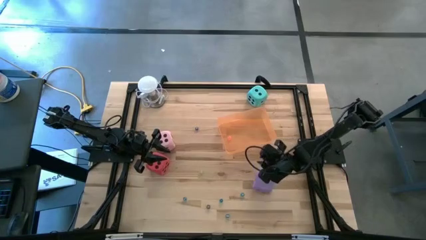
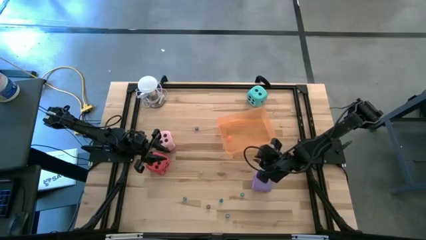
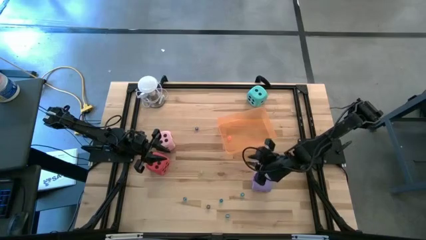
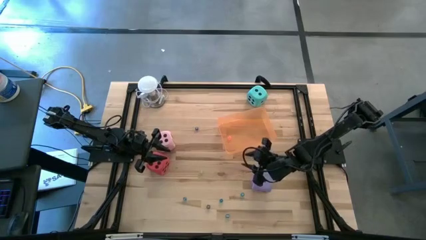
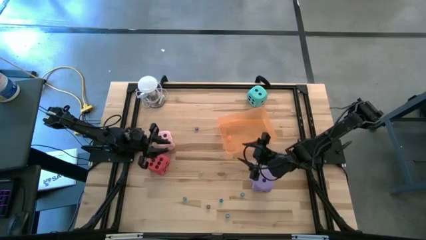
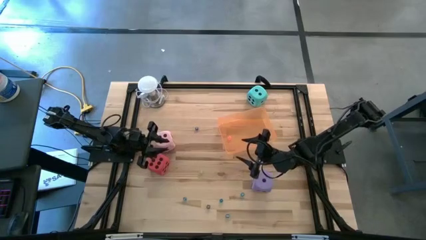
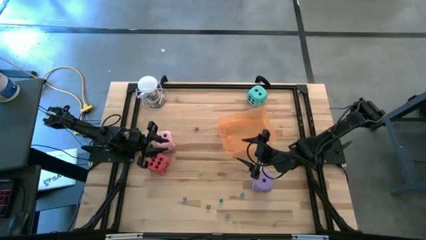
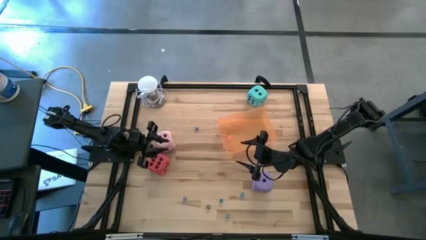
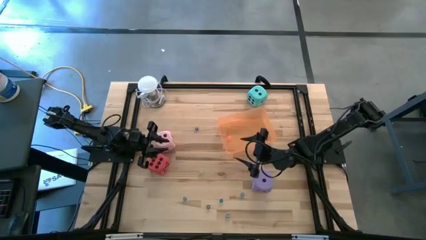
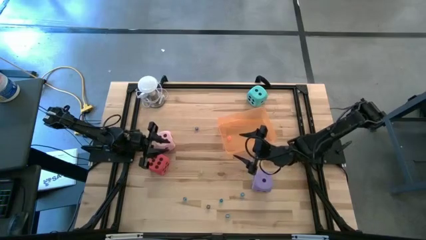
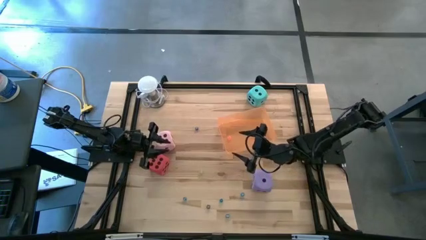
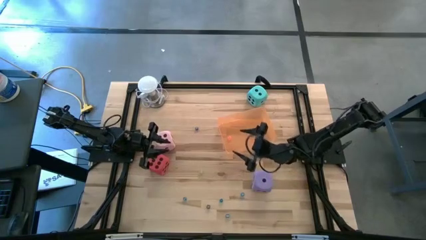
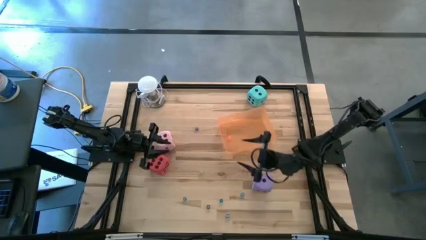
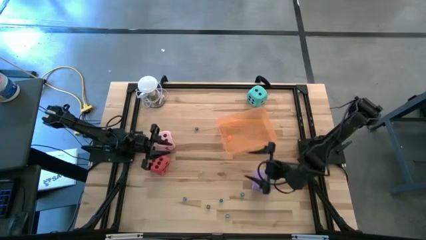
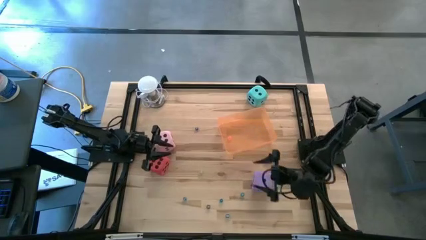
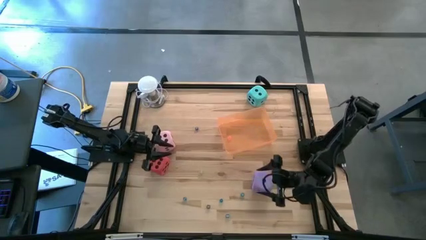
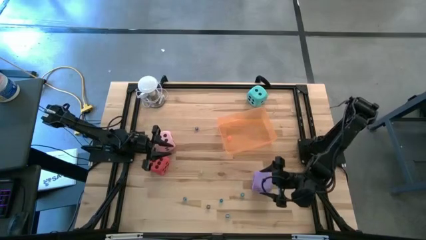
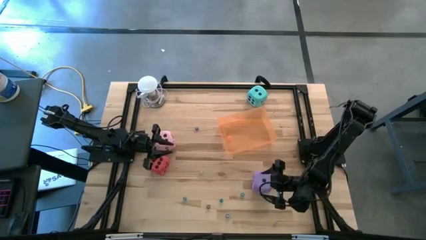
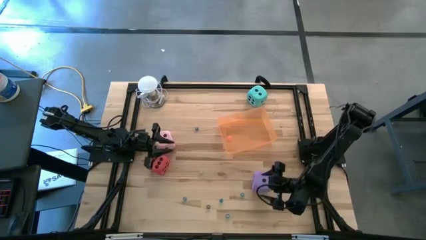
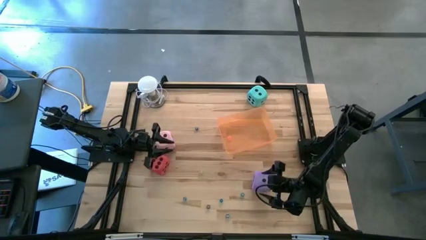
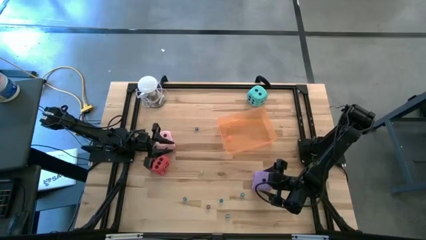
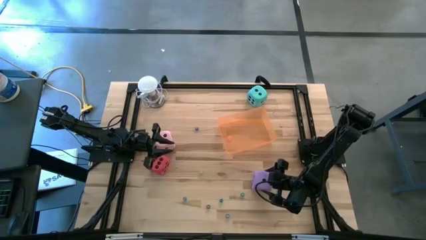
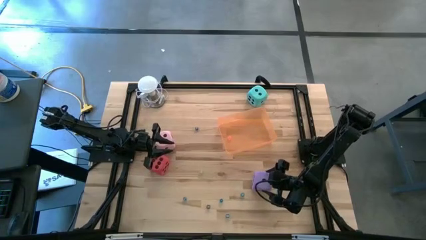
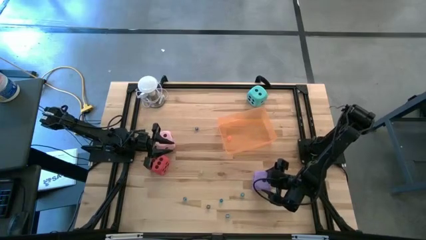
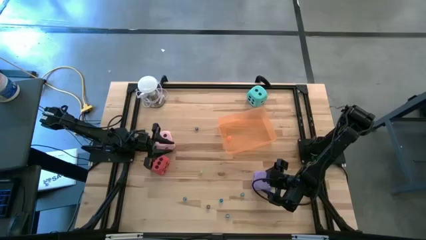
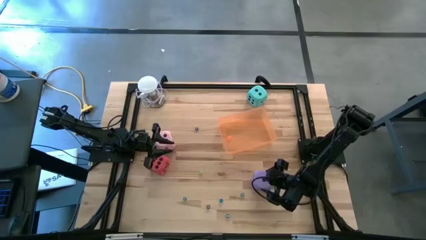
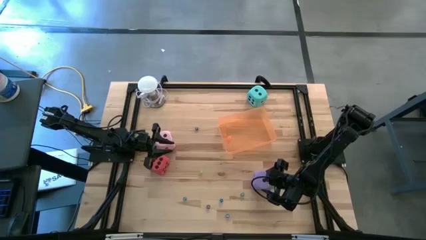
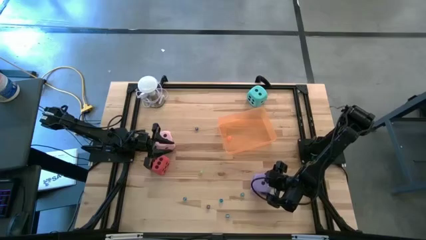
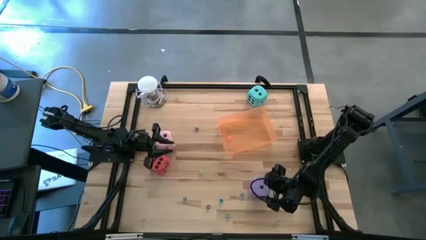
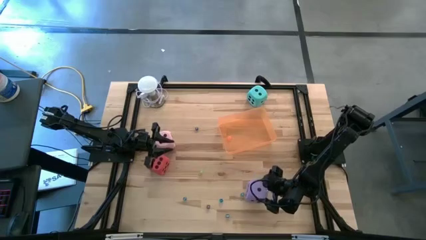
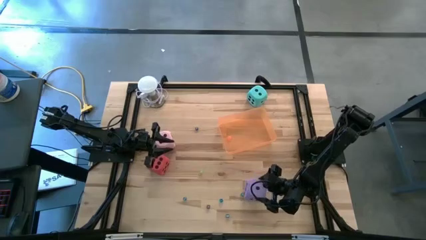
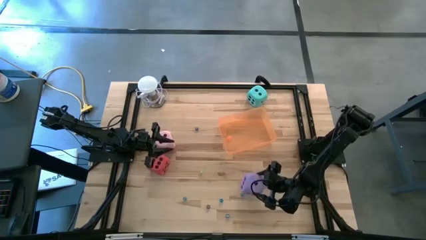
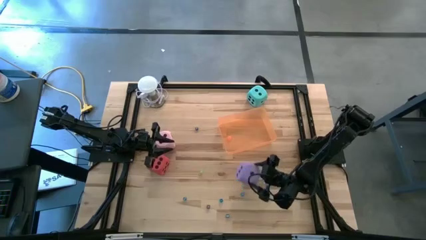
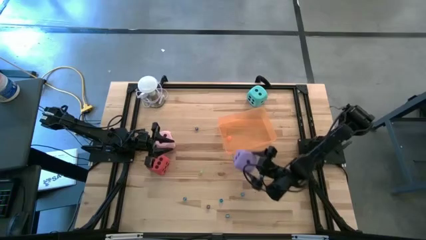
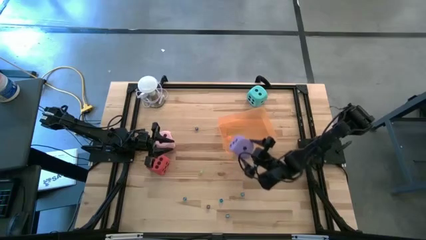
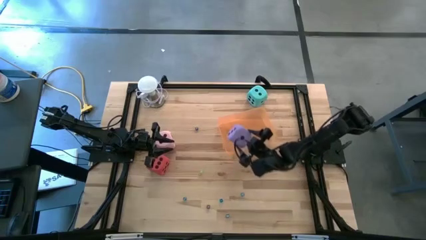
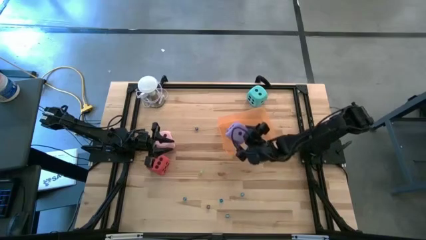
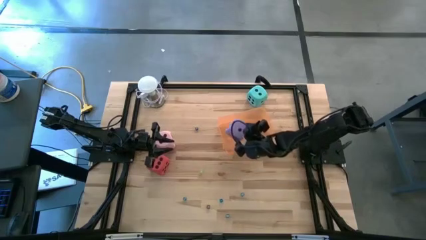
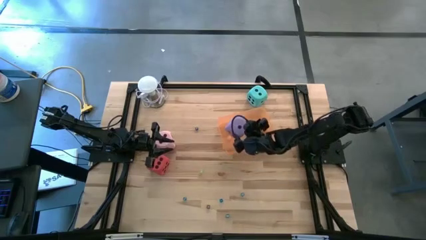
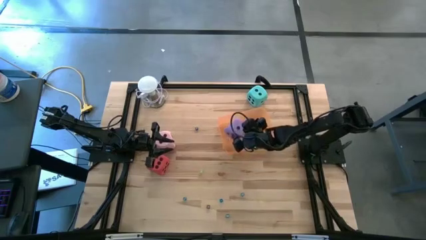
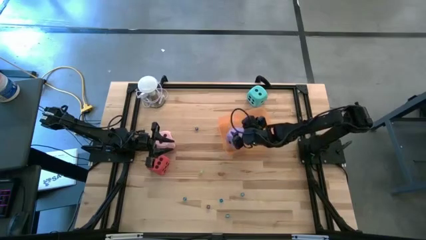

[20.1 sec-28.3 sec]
Task: Pick & Place Dice
Put the large violet dice into the orange bin

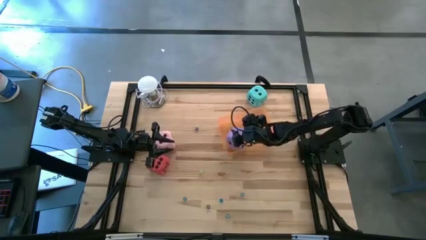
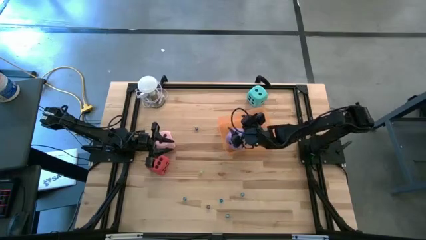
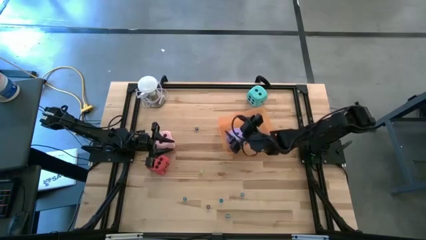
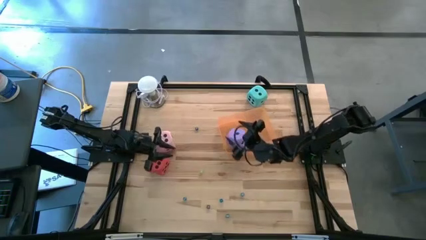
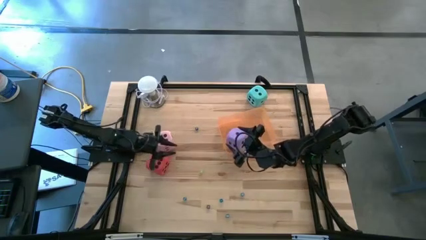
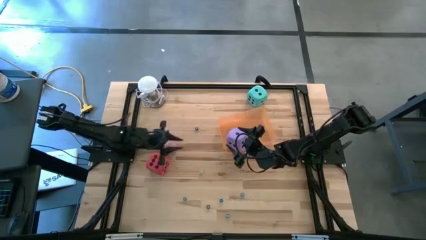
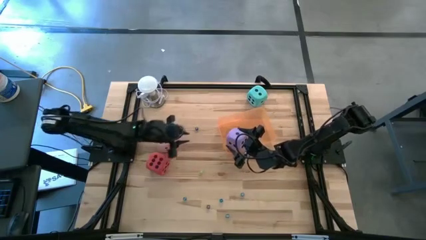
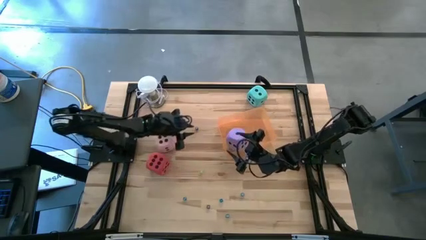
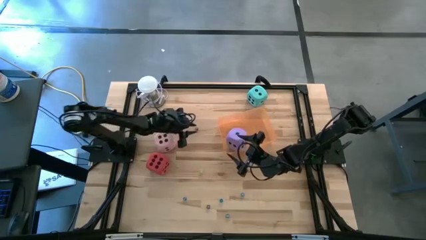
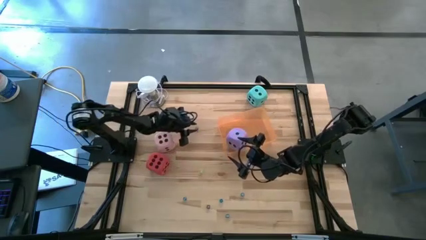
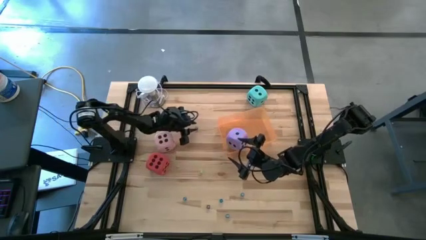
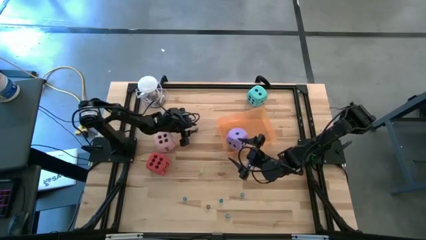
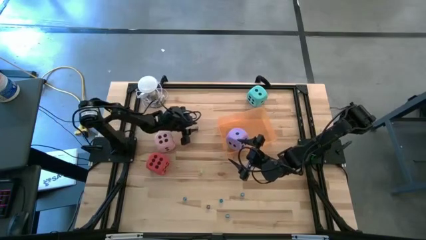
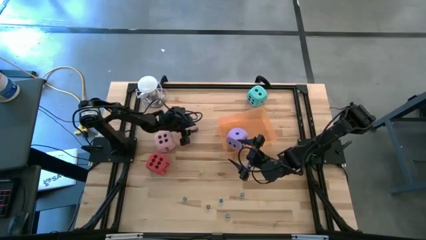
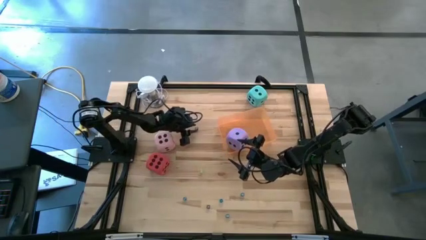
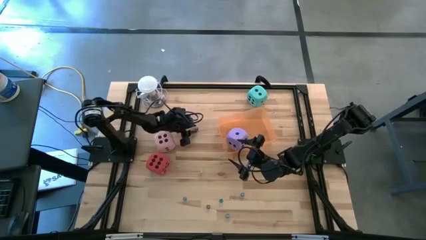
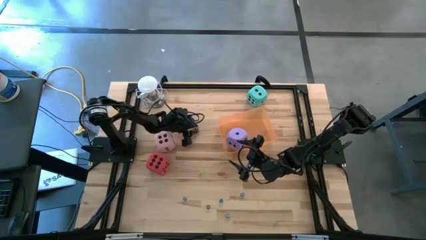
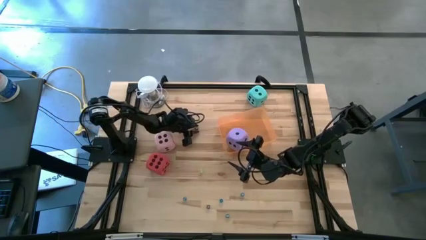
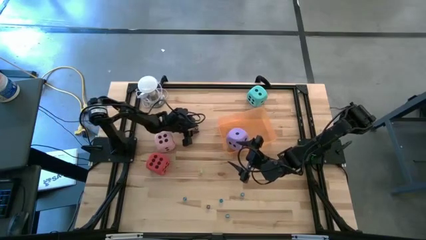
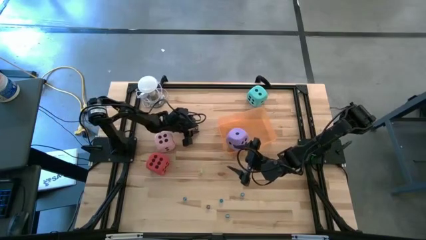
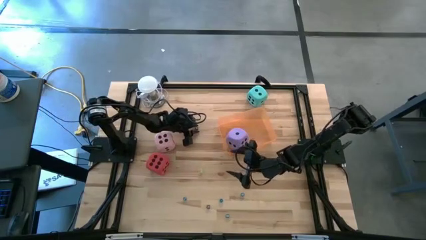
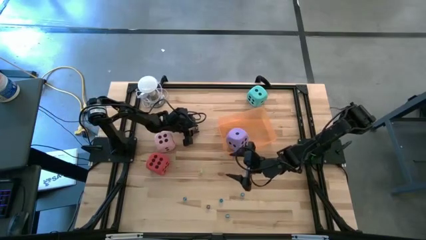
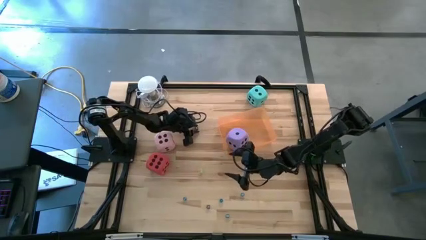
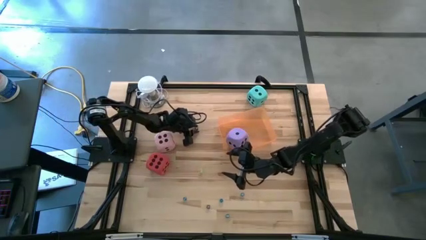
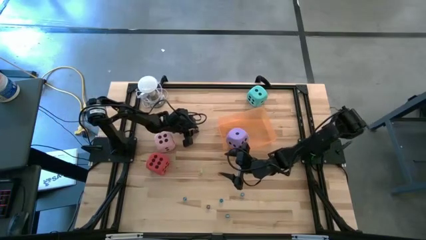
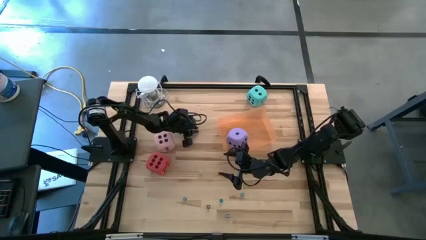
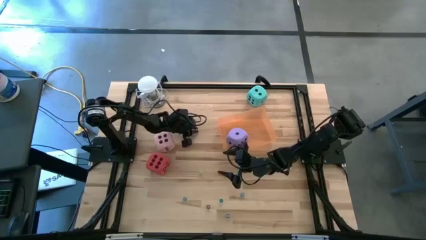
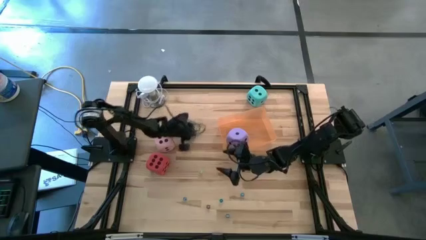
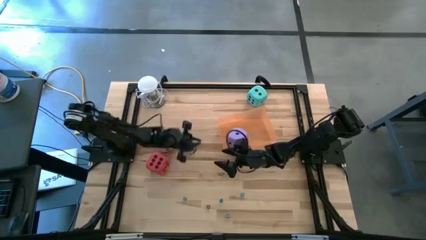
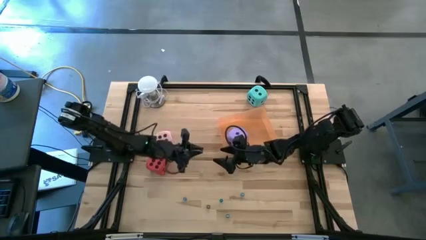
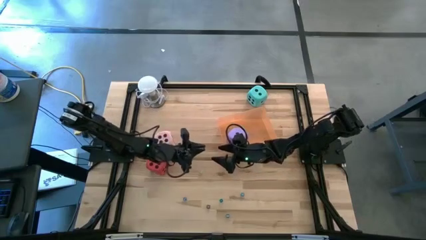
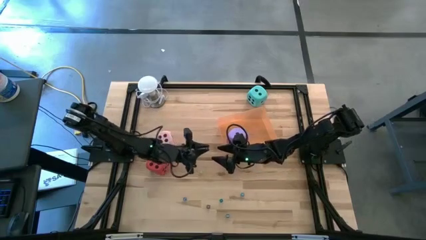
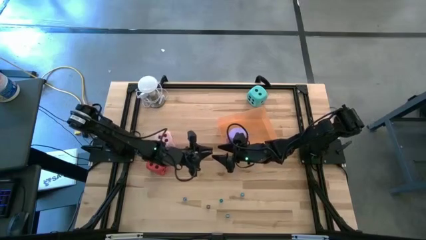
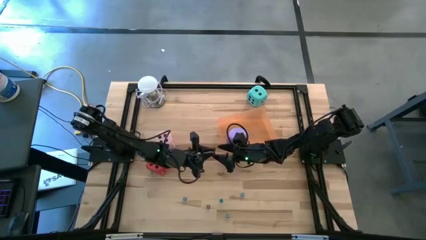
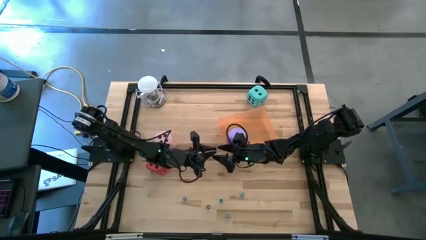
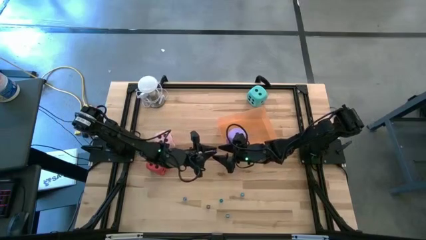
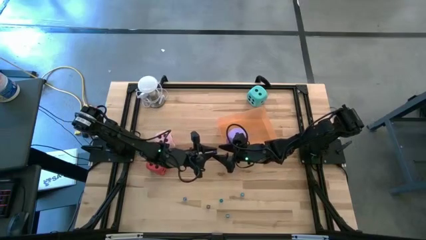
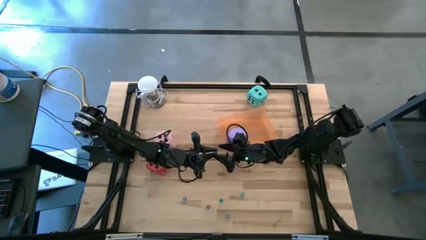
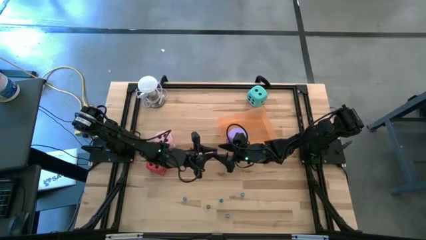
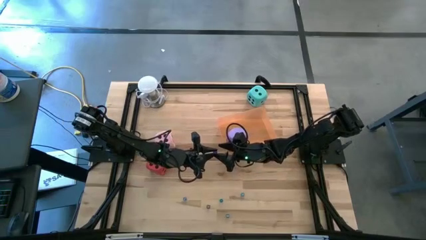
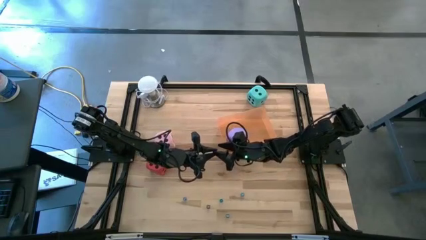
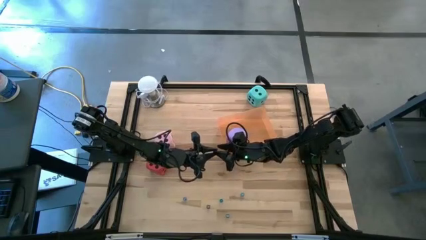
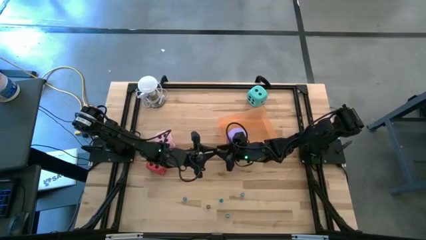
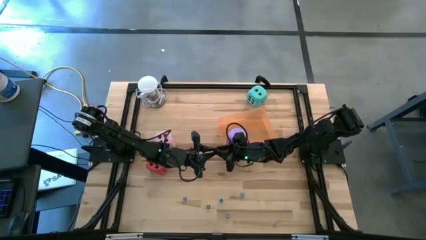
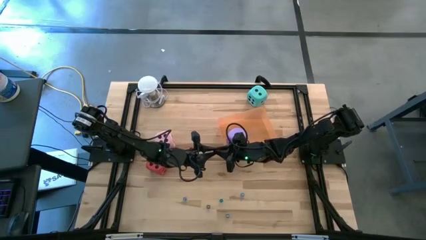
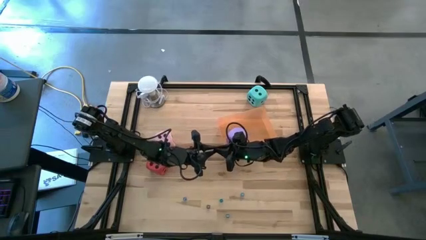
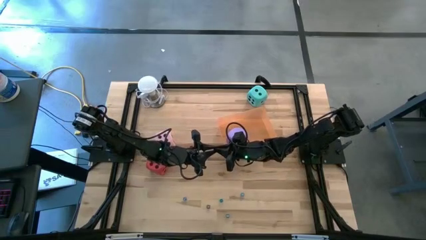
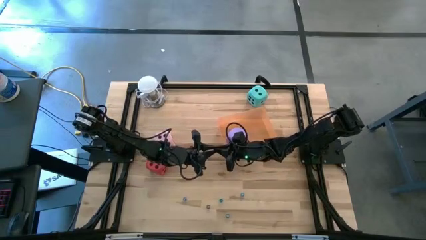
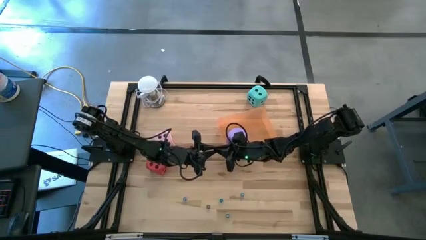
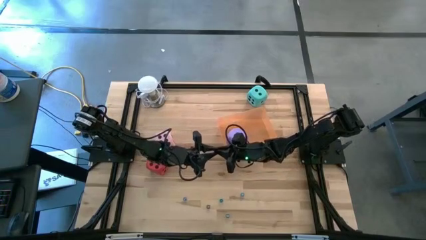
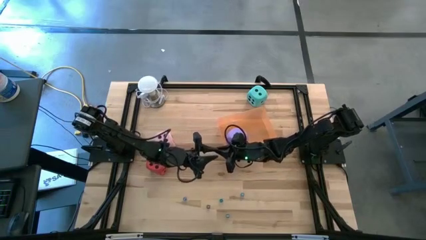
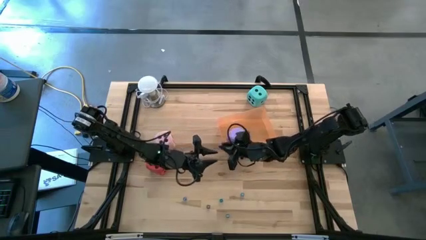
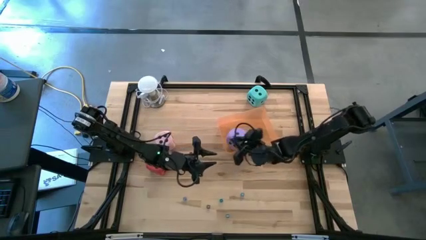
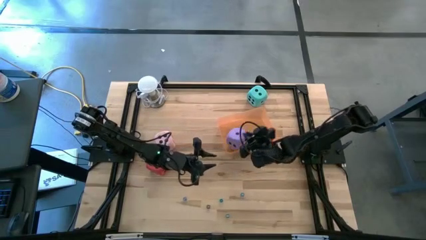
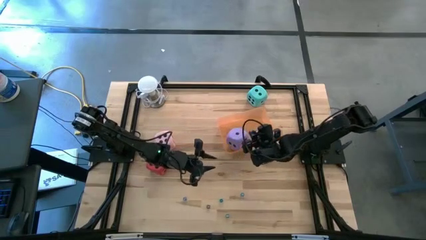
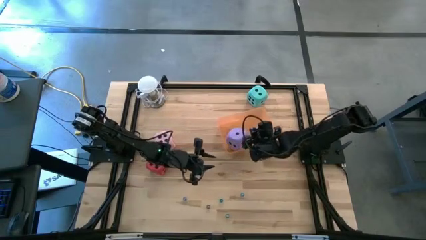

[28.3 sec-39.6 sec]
Put the small blue dice into the orange bin
